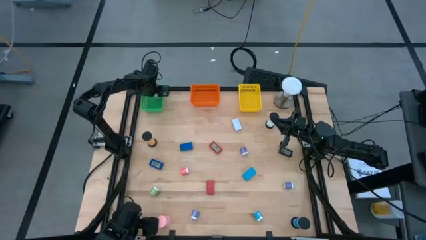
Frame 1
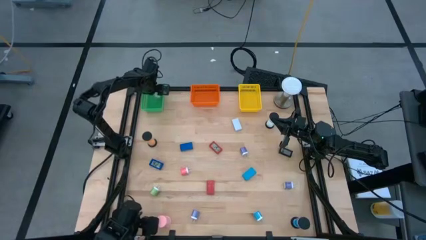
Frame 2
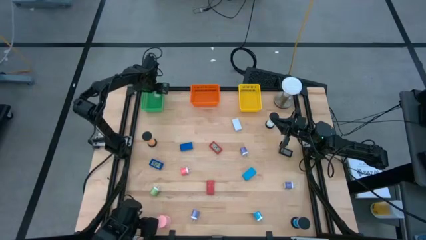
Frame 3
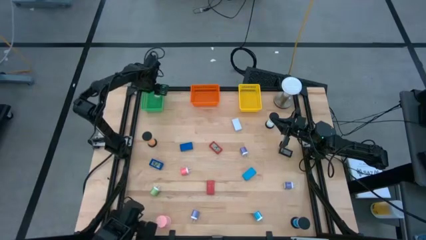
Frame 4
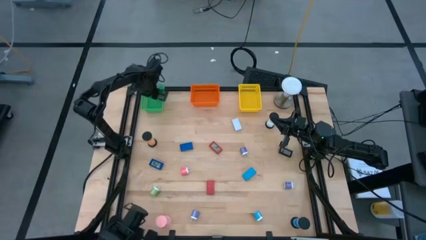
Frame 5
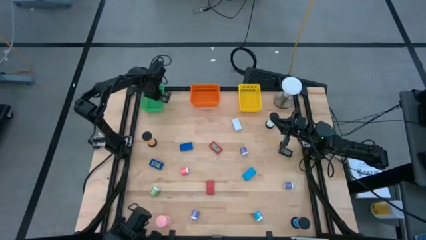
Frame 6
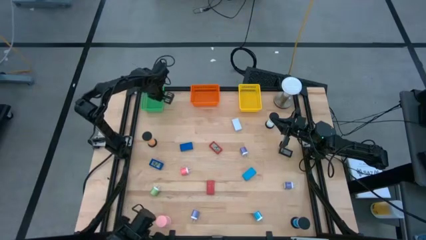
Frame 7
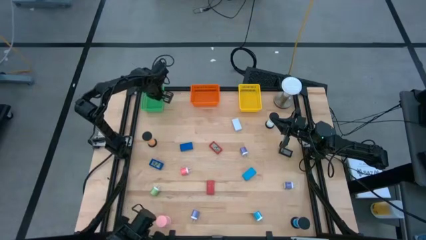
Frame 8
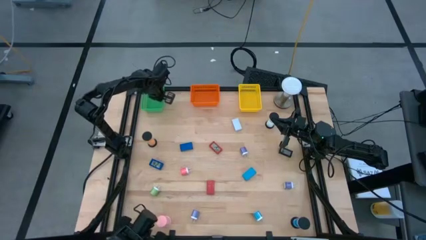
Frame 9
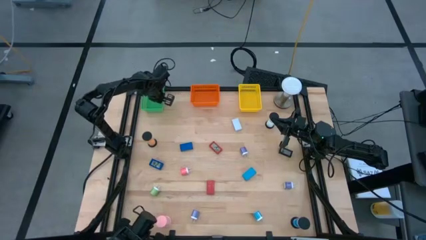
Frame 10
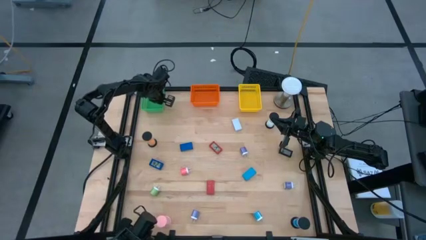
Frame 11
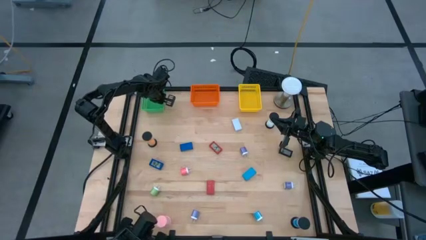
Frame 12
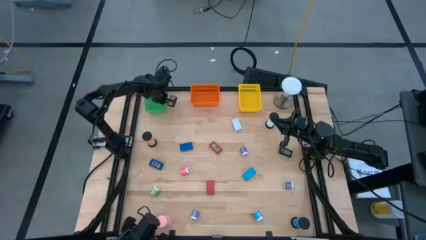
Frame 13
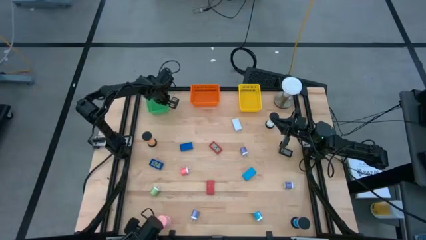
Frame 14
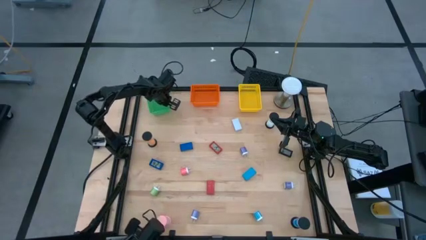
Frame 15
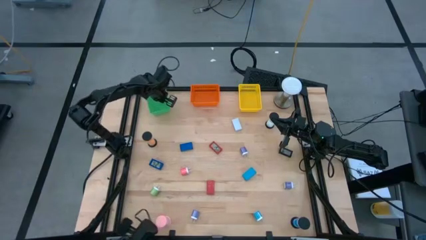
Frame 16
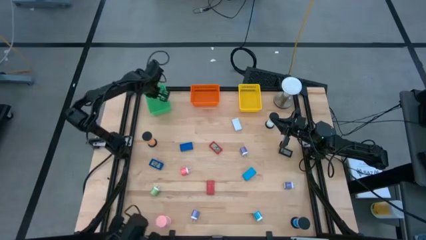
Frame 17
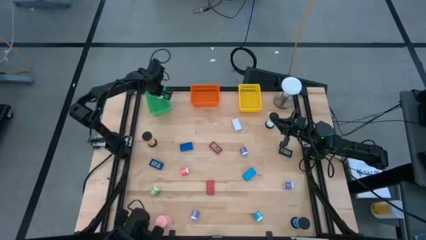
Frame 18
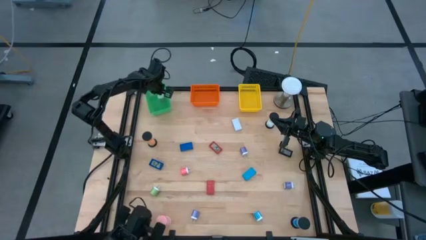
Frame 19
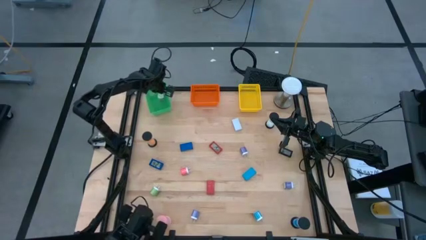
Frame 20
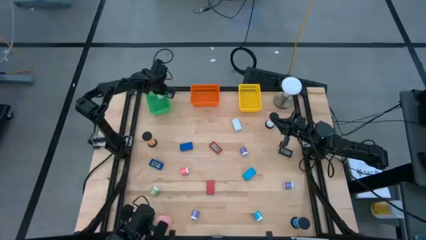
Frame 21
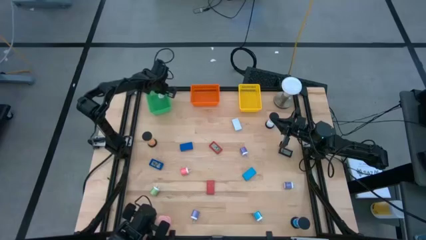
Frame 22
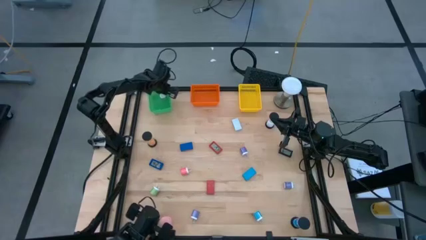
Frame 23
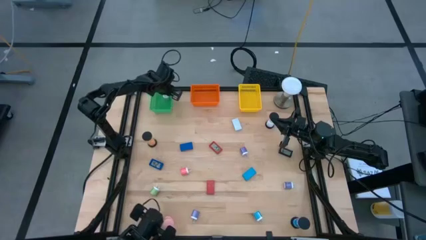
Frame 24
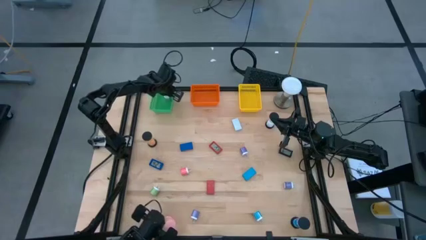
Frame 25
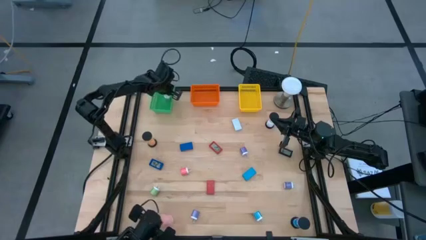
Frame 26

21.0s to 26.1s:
Task: Pick & Place Office items
Adjust the green bin

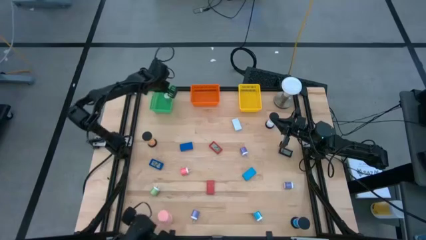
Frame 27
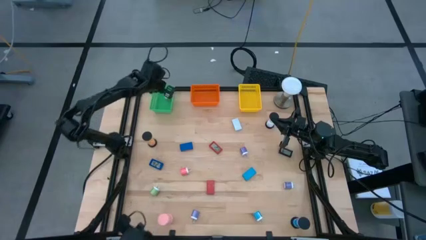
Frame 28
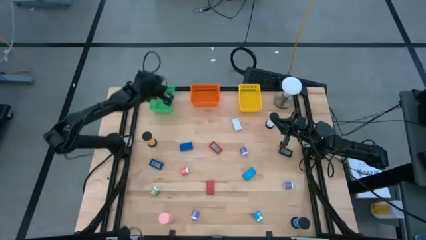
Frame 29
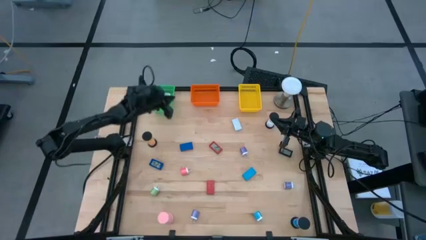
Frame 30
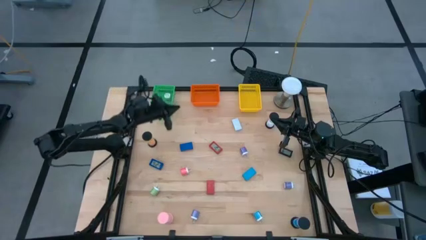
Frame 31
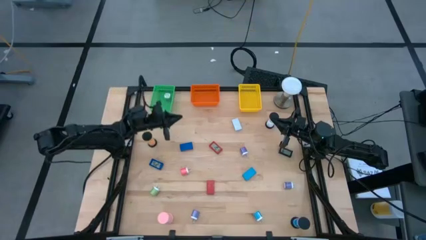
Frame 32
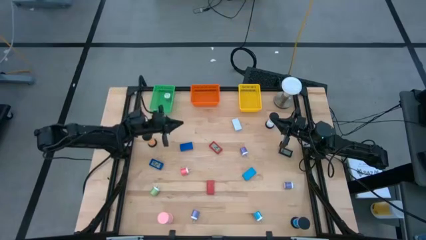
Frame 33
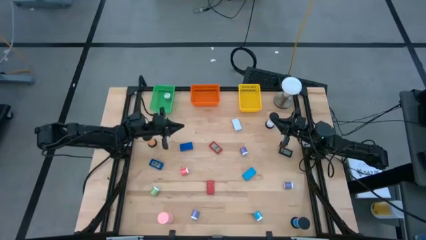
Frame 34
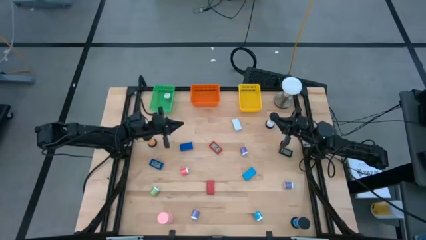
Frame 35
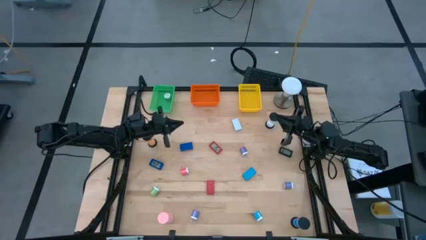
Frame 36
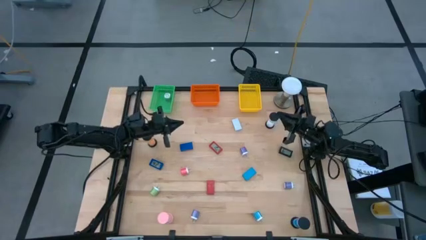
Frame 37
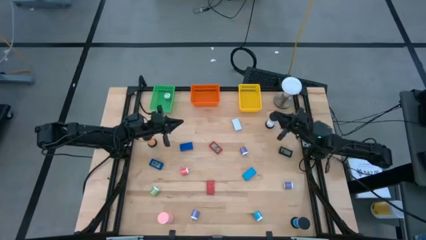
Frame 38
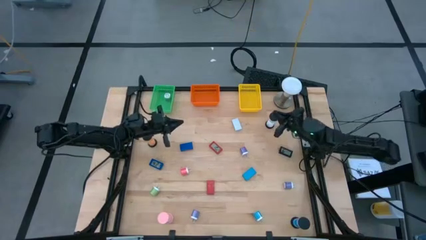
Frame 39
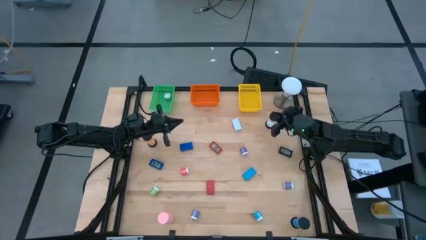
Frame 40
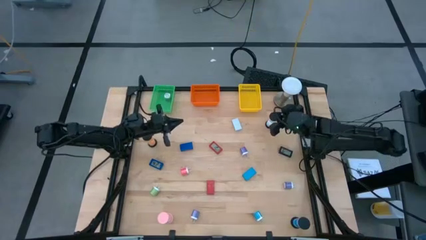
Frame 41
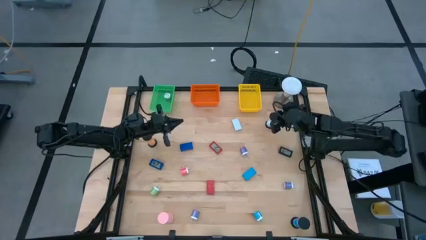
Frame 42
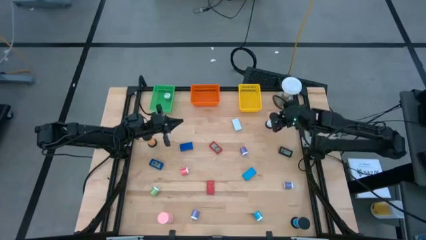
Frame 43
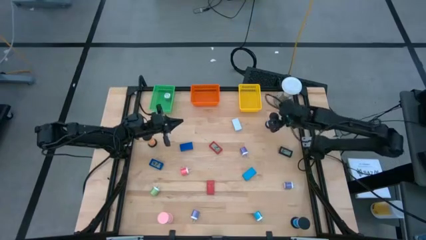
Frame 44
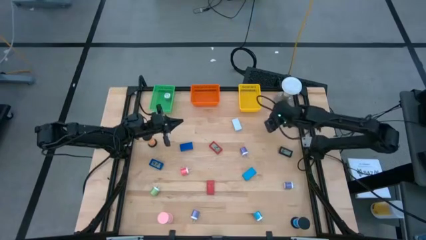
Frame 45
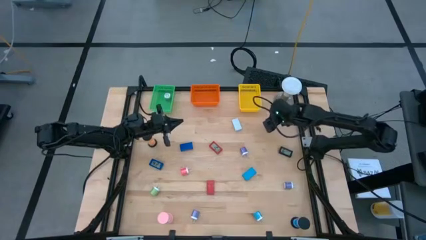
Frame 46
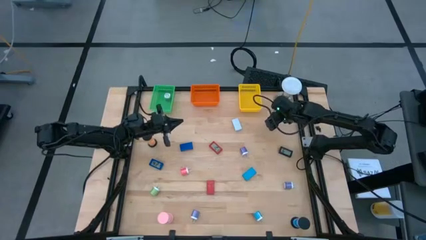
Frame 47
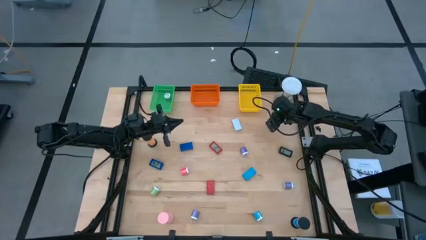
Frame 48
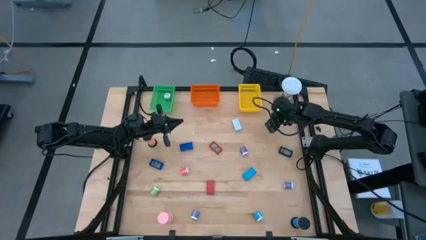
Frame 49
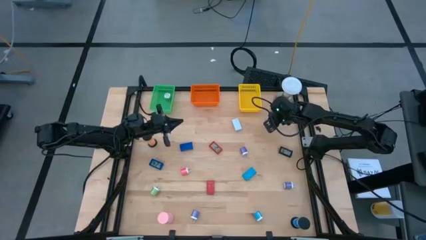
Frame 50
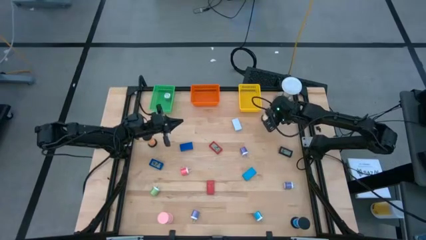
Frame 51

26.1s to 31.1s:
Put the white hourglass into the yellow bin

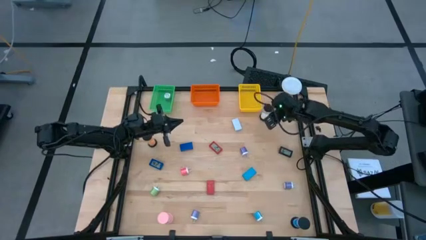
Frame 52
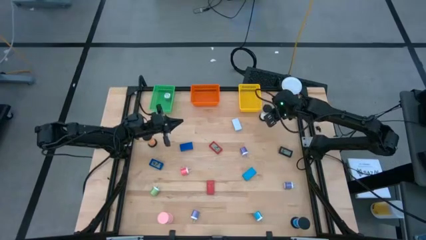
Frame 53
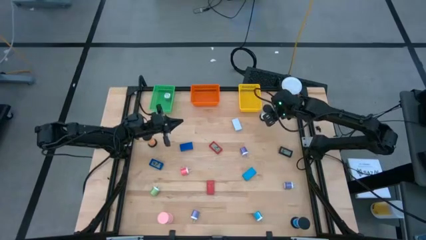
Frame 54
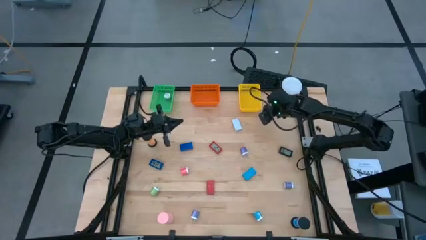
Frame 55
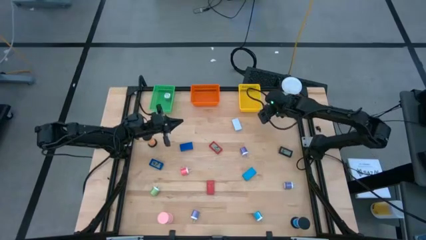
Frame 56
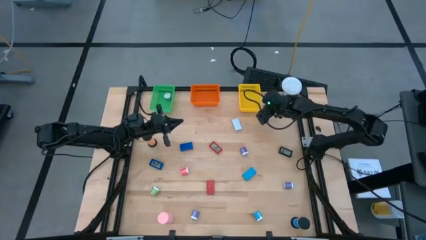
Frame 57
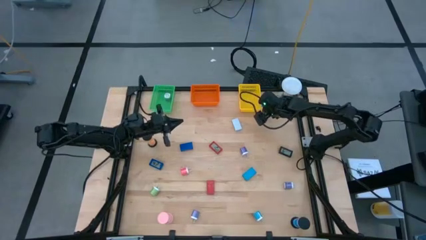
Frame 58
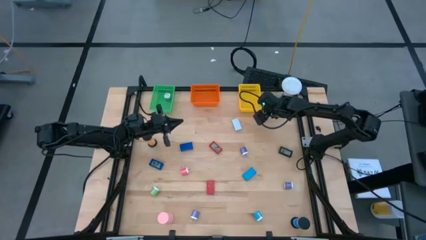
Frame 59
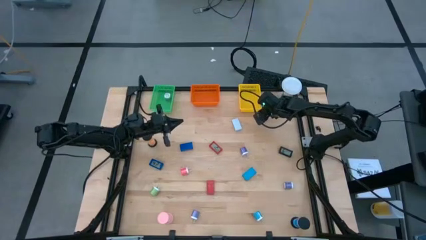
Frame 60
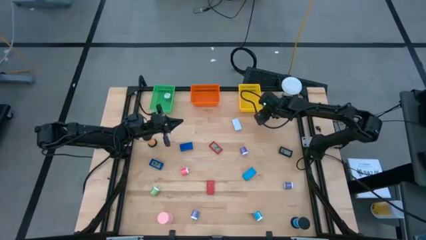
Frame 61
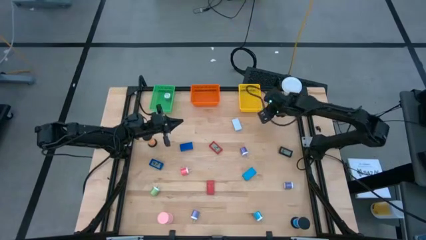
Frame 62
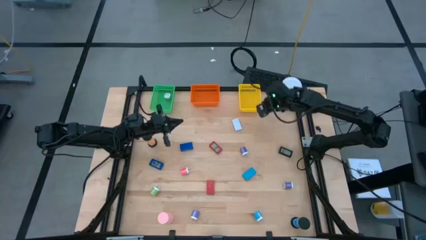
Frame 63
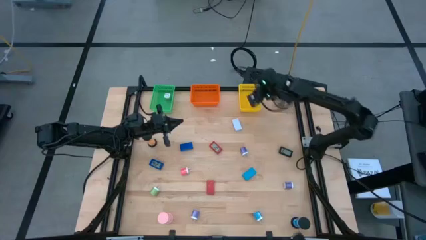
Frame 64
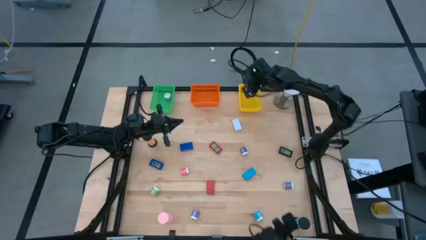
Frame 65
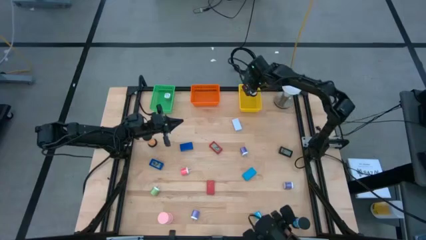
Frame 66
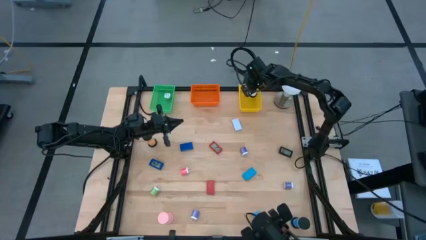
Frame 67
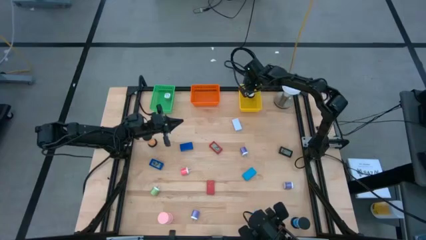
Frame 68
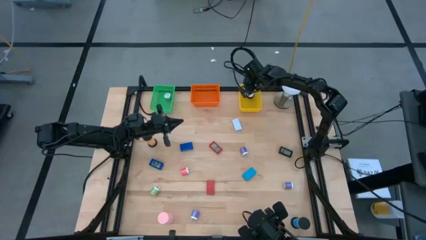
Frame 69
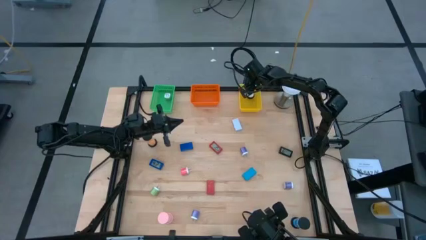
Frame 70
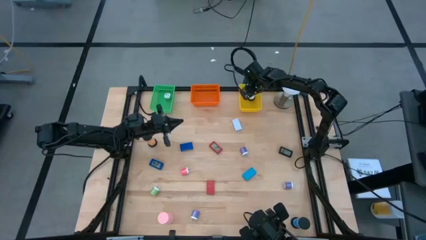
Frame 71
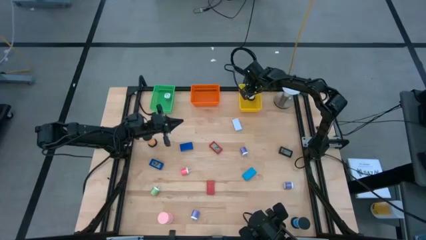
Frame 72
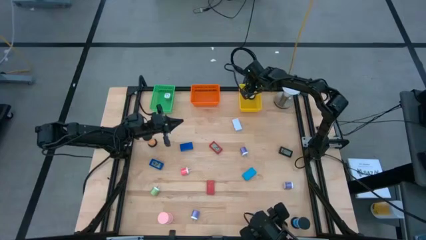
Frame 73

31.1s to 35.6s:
Put the white hourglass into the yellow bin

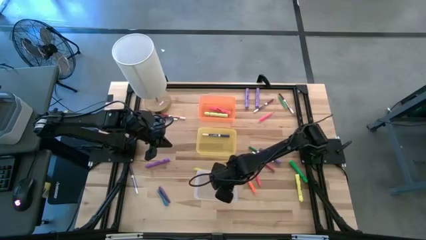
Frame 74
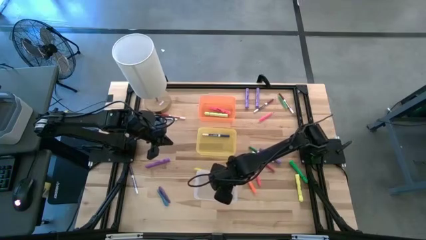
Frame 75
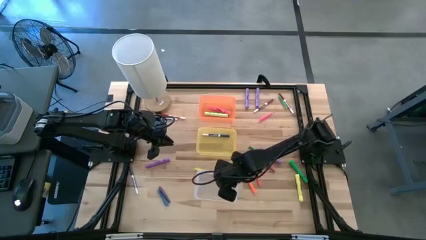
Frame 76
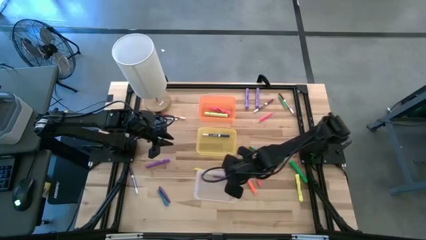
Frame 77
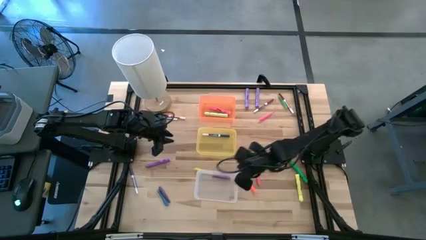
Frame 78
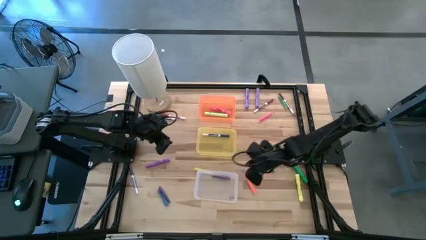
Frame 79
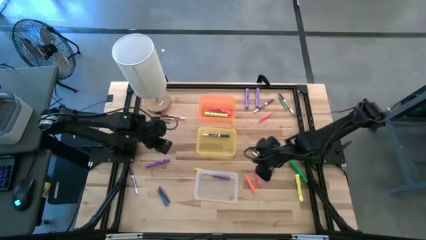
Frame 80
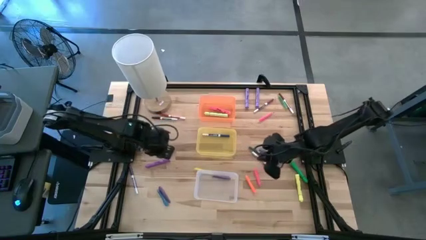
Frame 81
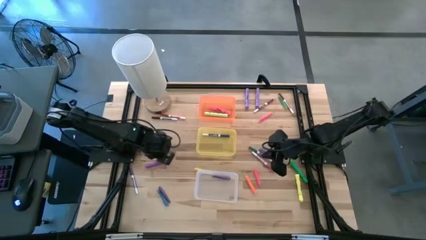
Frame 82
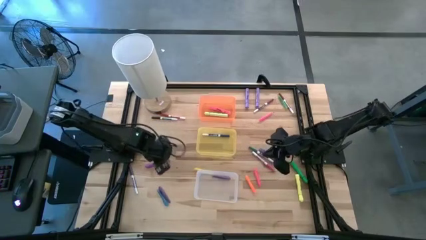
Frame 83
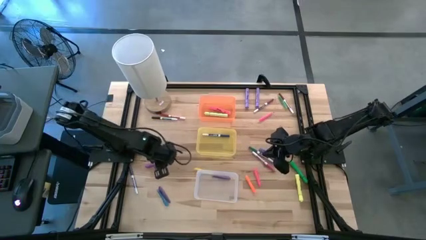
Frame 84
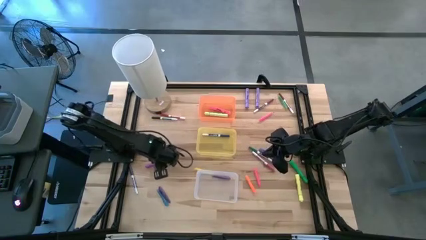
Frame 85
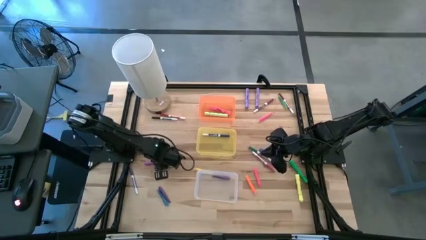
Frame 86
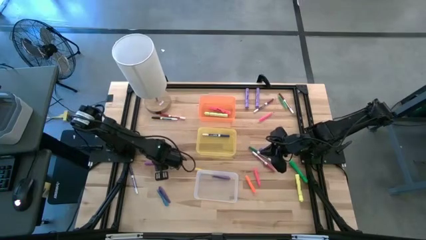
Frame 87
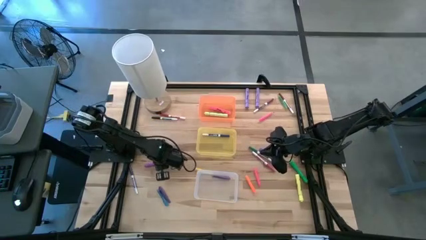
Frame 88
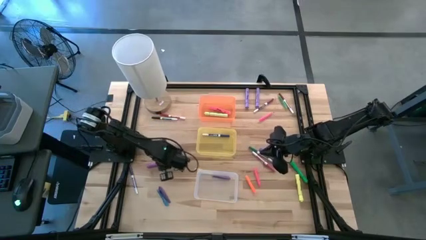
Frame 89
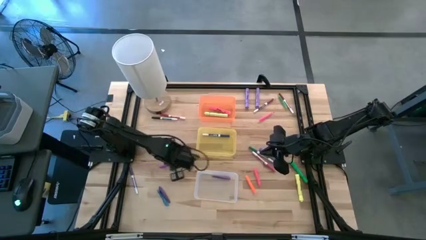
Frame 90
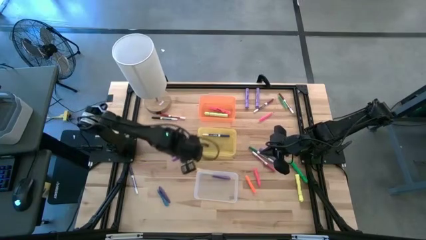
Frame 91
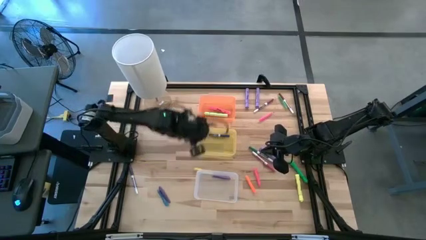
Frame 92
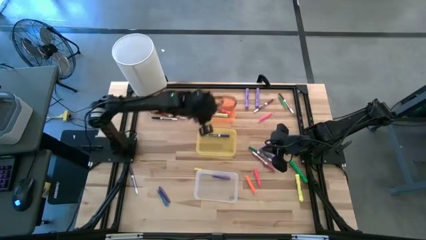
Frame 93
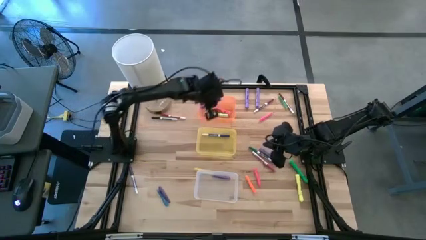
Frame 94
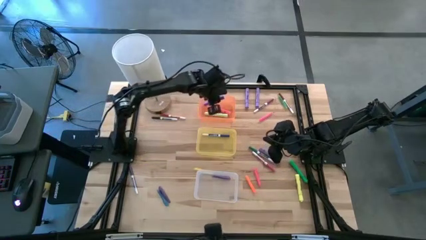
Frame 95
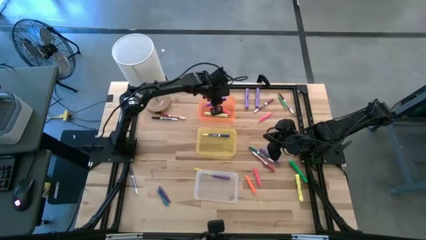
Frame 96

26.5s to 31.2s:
Task: Pick & Place Markers
Put the purple highlighter pen into the orange bin
